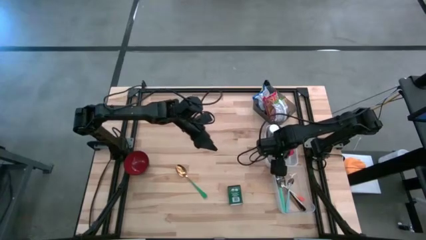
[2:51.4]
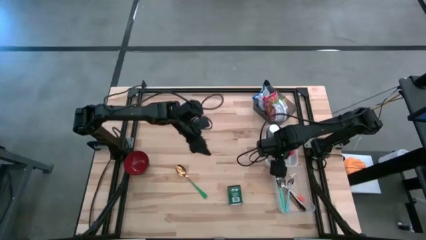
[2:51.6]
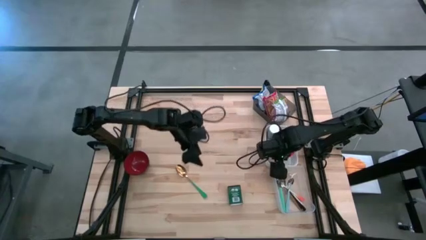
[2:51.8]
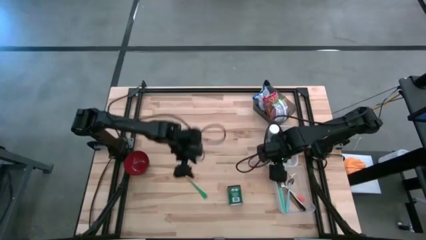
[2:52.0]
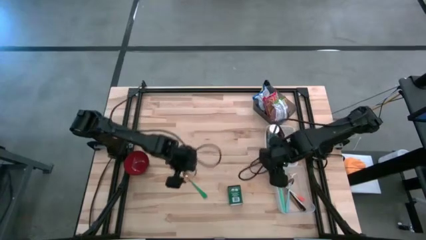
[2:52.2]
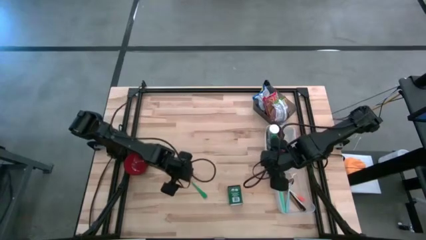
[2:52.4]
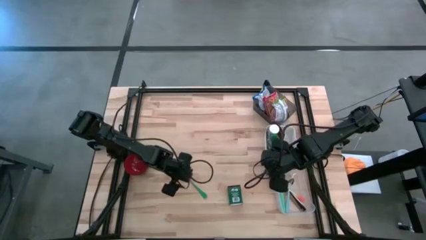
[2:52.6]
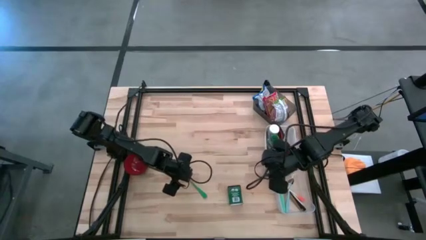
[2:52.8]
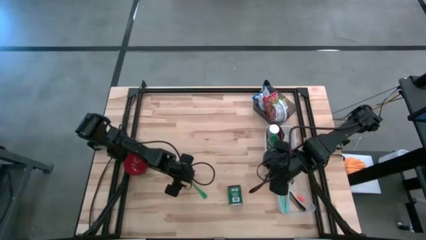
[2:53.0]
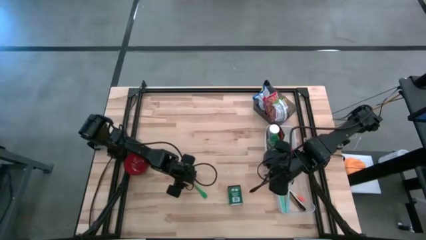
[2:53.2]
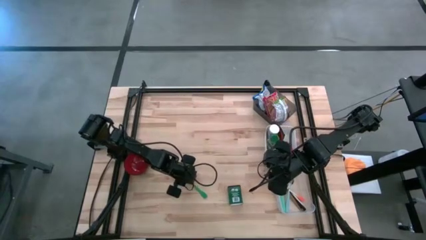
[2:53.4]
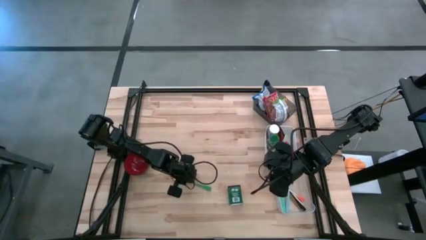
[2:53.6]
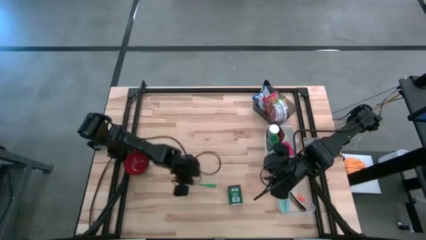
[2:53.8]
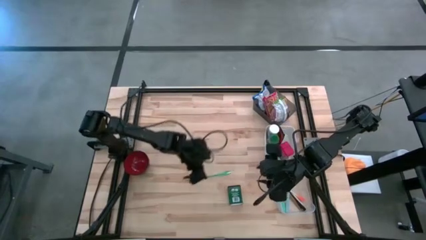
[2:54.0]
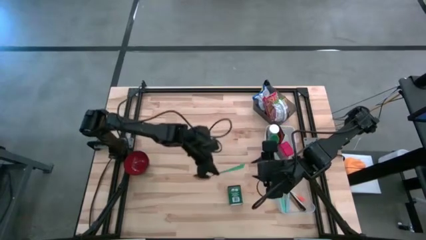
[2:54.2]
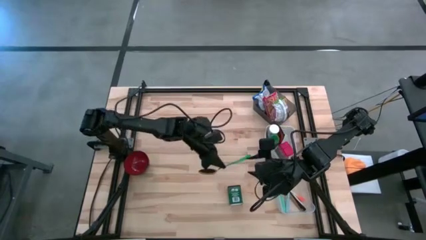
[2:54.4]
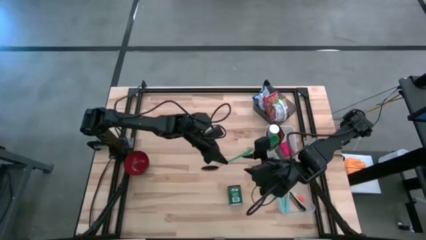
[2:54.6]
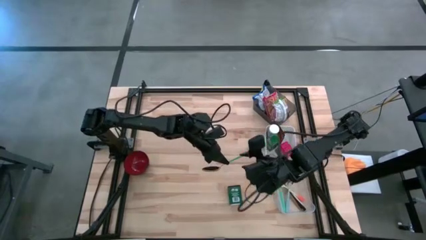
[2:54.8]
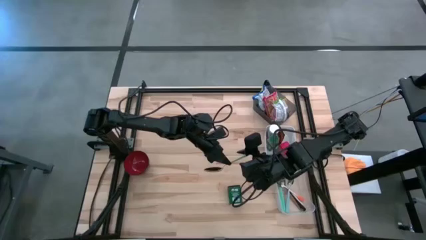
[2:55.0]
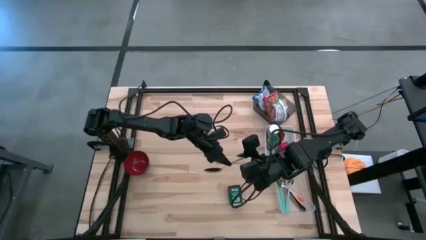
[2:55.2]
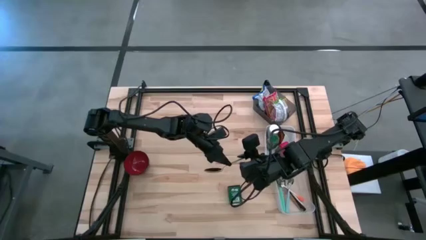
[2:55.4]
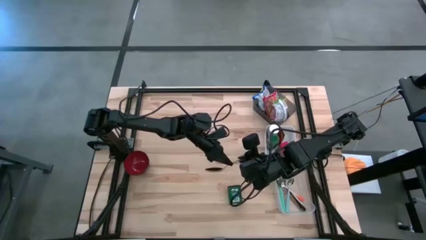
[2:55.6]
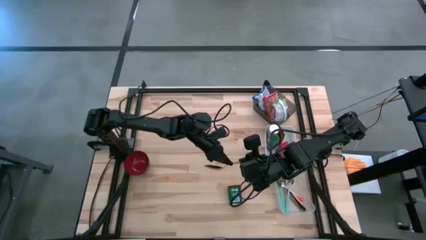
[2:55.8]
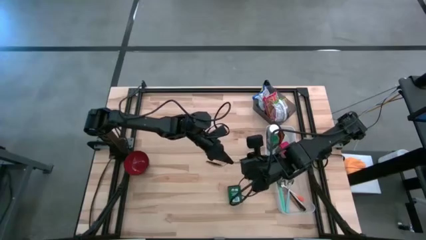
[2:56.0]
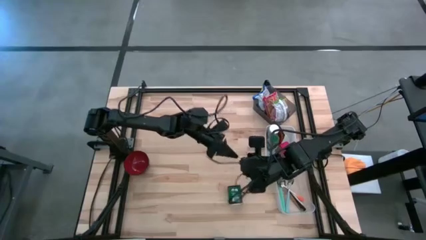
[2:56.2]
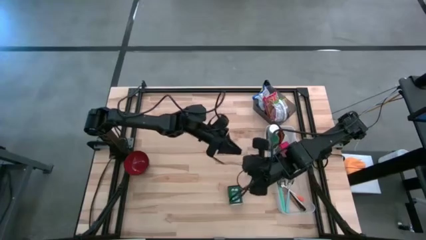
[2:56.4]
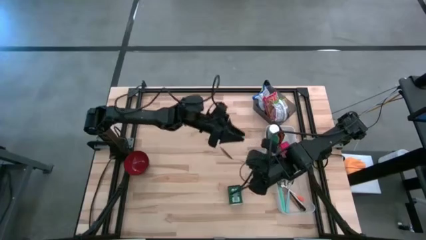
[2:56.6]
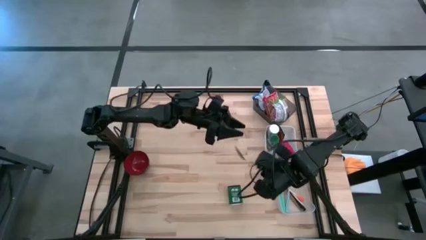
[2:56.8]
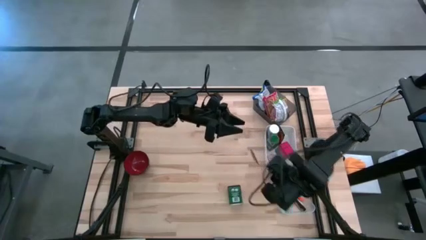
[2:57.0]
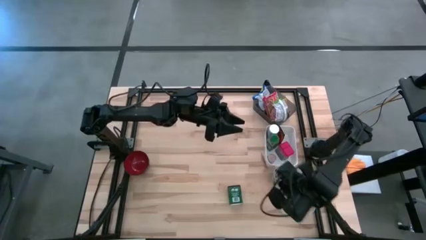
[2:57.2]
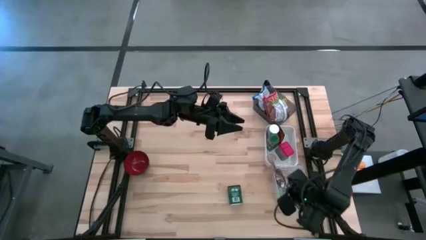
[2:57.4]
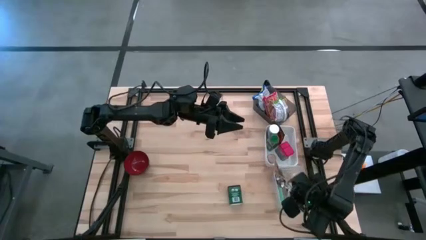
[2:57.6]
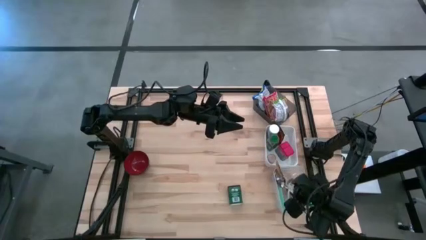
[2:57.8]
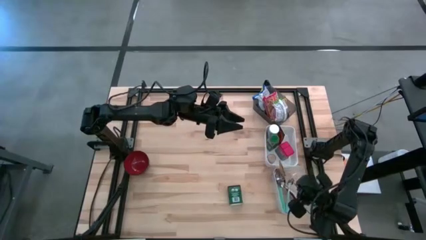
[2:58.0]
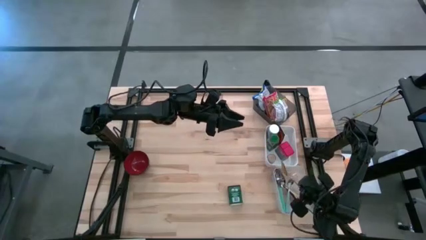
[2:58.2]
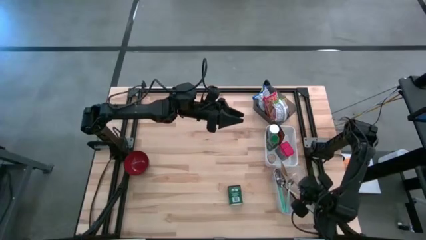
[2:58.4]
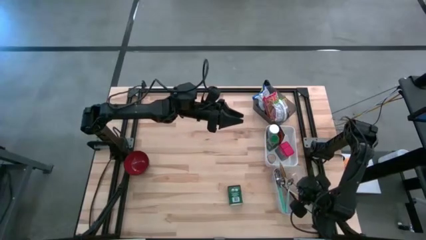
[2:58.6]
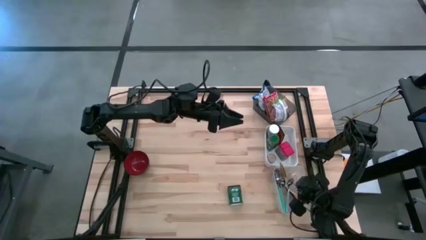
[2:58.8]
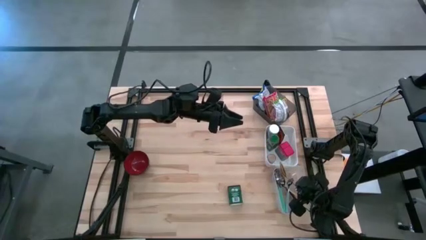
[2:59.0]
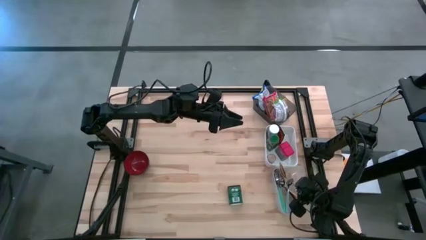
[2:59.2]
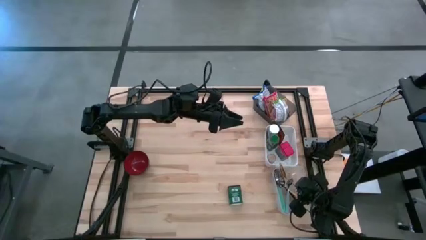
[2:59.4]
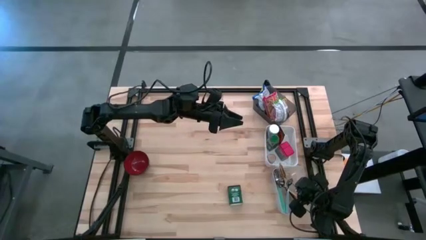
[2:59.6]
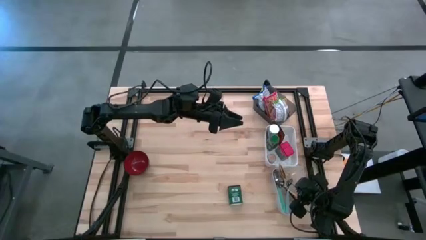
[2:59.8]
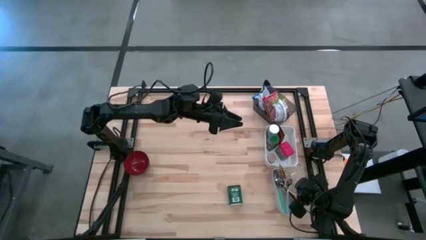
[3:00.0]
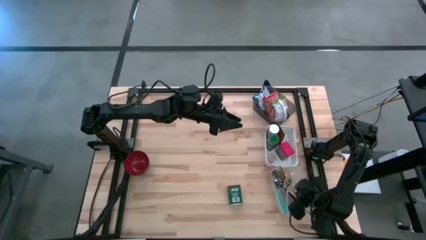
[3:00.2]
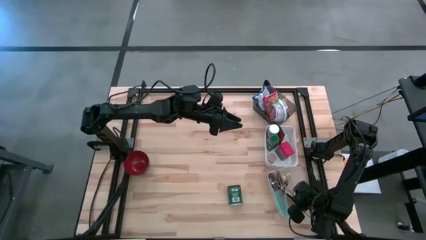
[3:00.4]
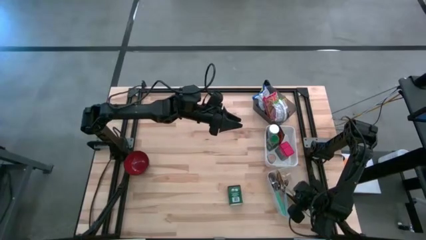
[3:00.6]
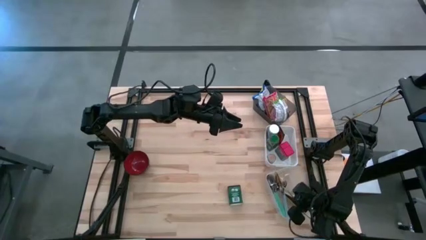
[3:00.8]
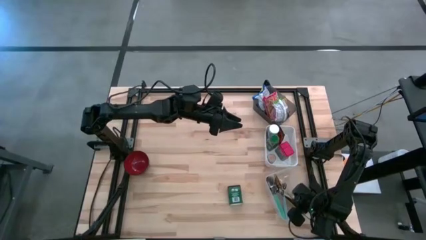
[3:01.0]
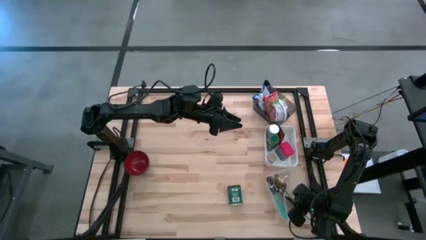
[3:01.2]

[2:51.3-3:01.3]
Put the green spoon into the transparent bin

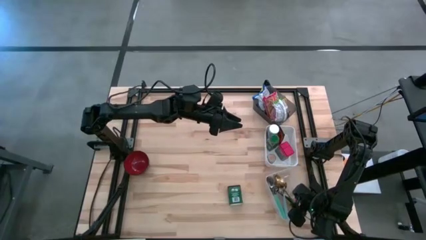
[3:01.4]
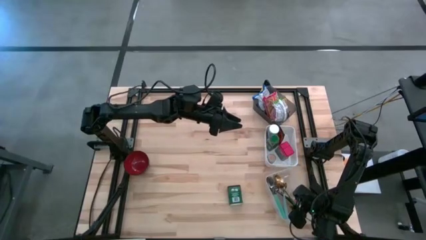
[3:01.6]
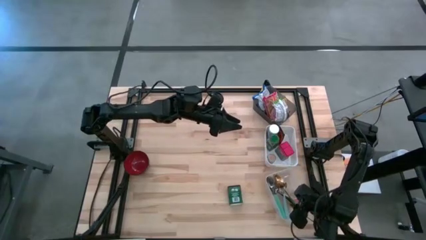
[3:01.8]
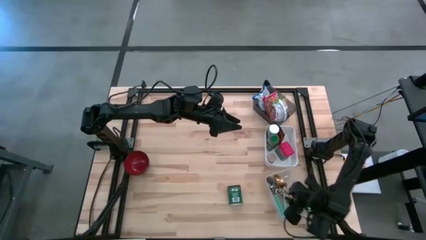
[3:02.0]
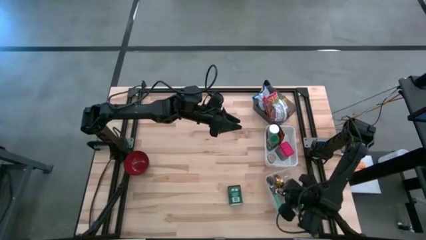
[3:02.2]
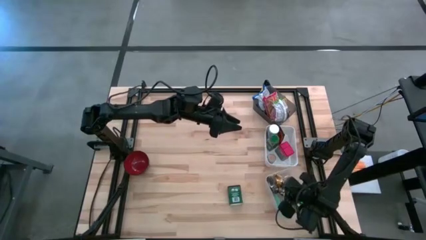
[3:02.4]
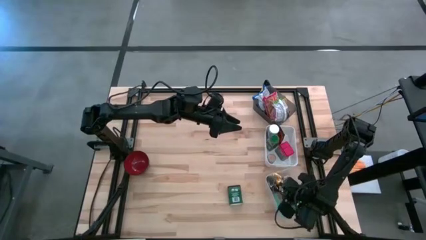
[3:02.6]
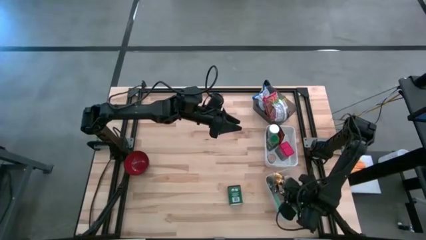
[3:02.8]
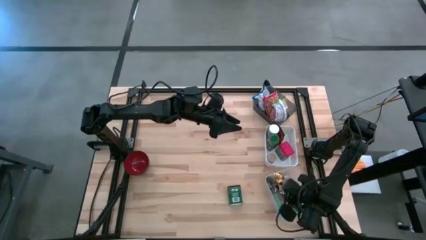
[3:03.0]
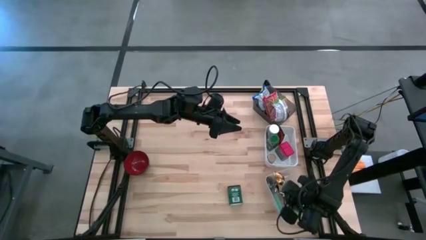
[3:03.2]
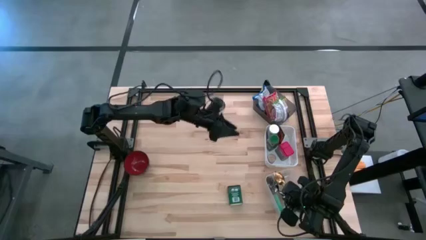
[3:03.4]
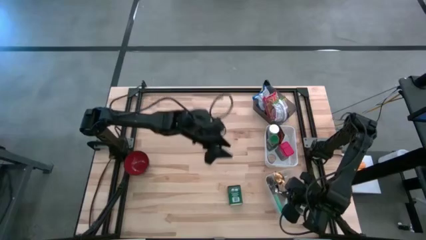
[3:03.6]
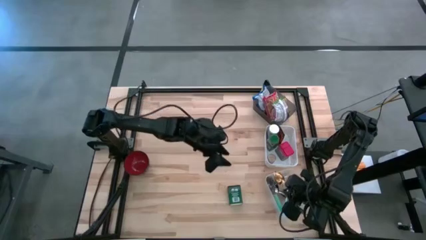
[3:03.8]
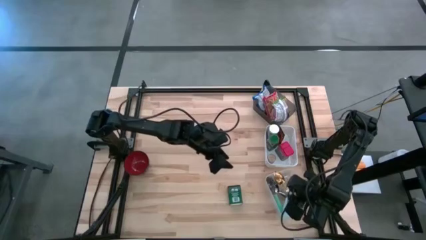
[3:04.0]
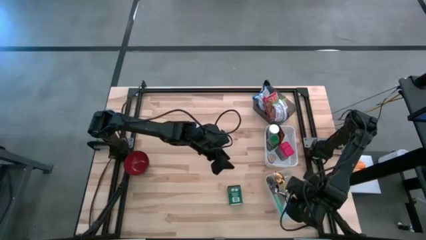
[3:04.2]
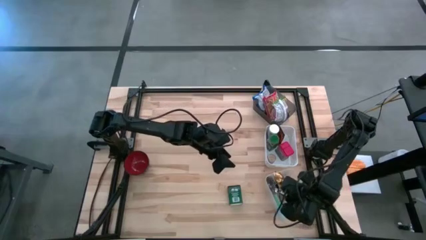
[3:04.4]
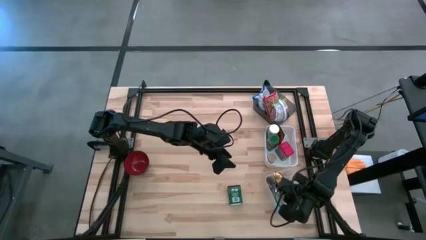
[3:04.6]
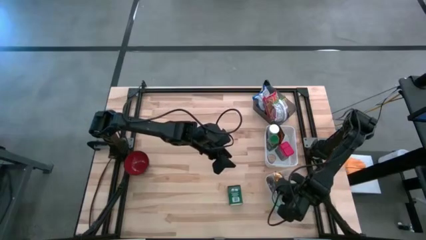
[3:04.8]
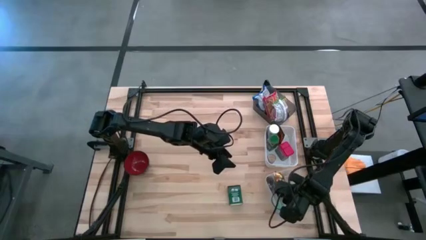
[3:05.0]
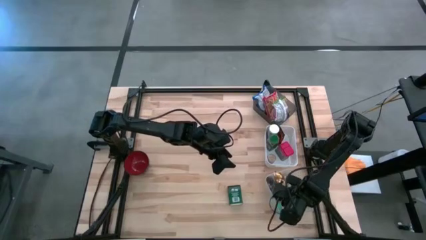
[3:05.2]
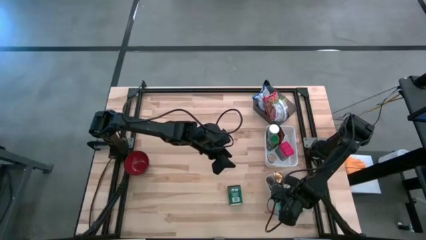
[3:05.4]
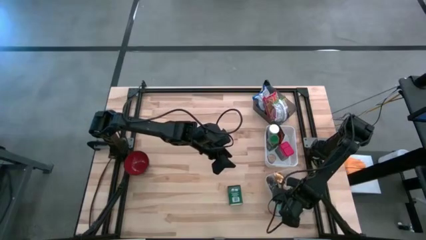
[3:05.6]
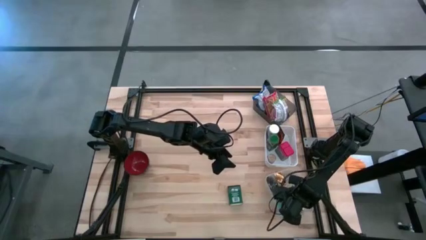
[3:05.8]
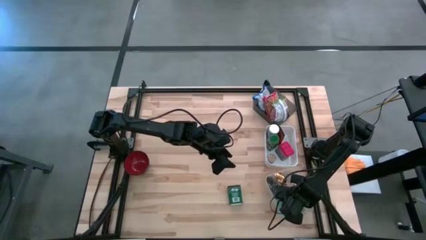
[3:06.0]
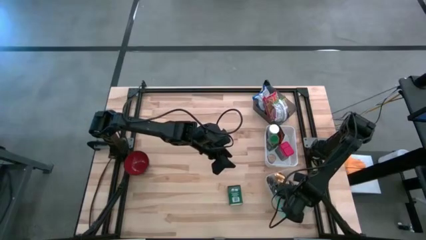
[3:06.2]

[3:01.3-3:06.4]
Adjust the spoons in the transparent bin
